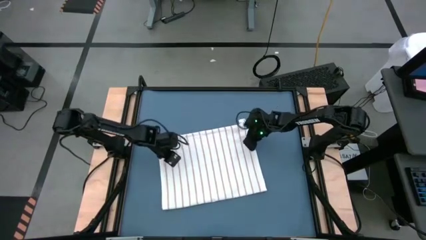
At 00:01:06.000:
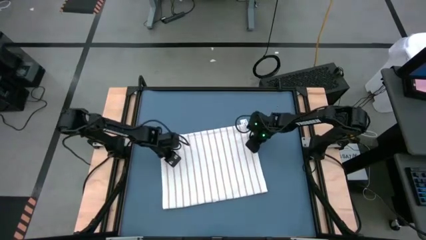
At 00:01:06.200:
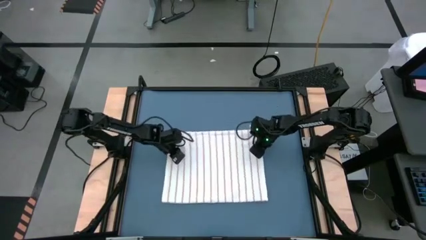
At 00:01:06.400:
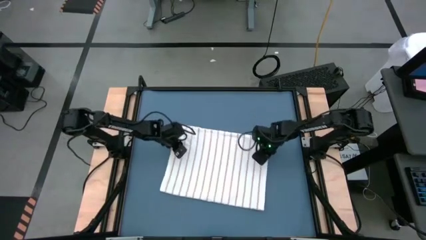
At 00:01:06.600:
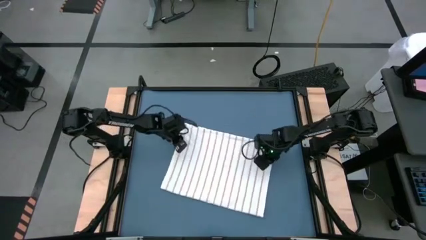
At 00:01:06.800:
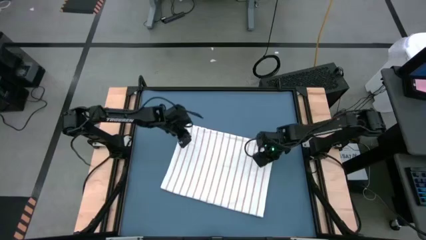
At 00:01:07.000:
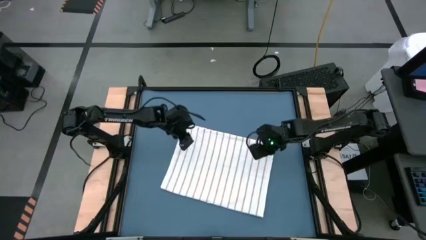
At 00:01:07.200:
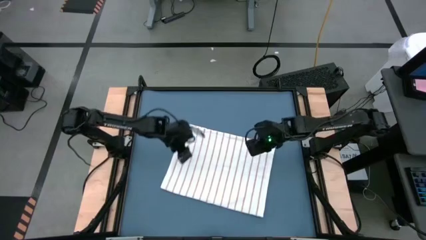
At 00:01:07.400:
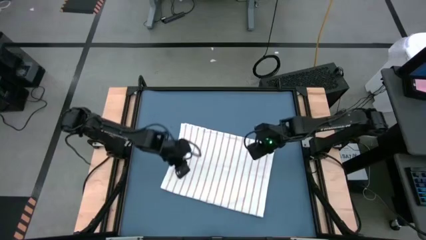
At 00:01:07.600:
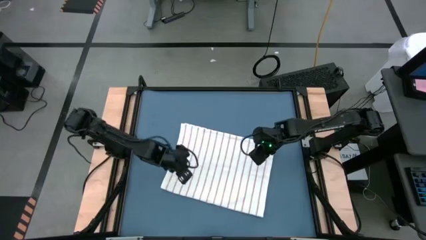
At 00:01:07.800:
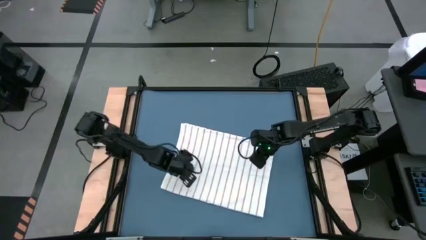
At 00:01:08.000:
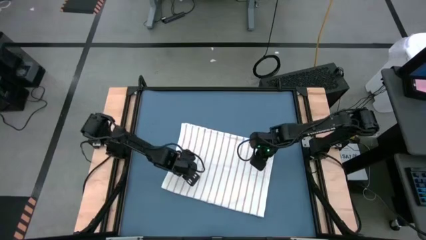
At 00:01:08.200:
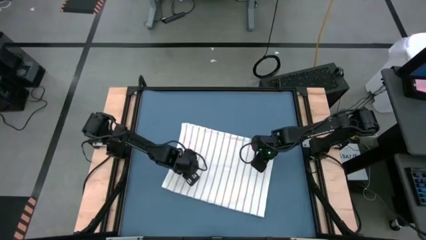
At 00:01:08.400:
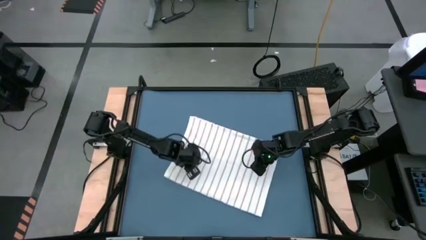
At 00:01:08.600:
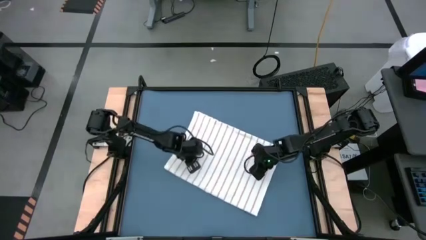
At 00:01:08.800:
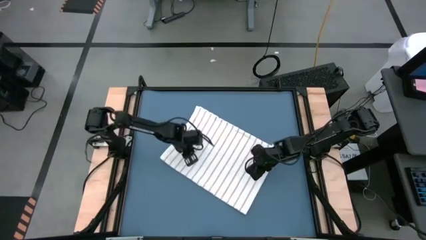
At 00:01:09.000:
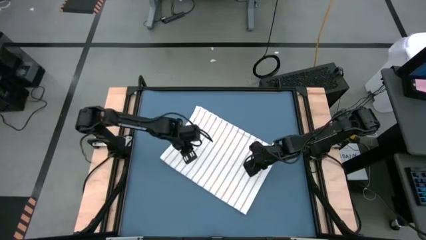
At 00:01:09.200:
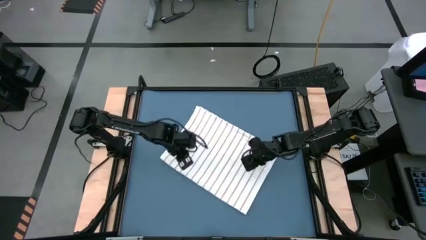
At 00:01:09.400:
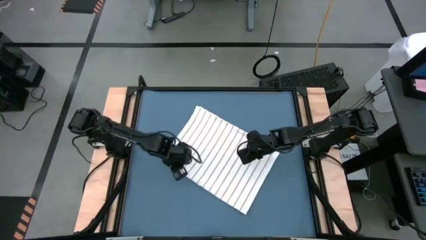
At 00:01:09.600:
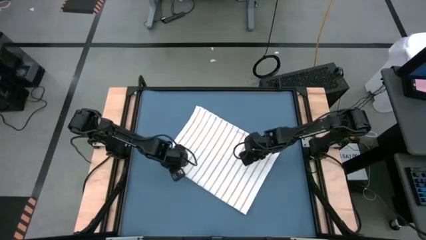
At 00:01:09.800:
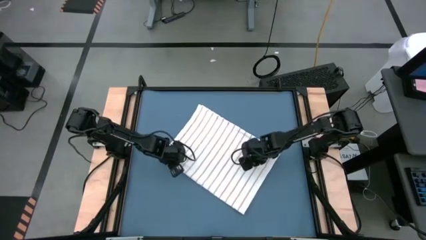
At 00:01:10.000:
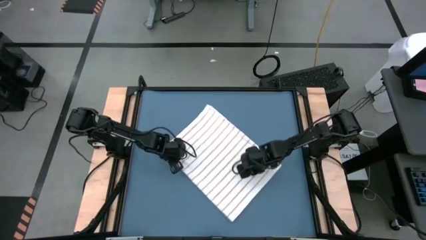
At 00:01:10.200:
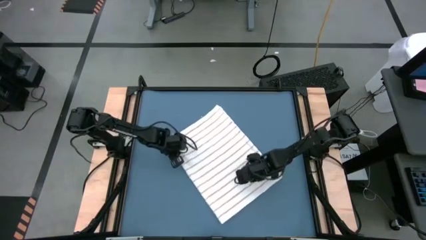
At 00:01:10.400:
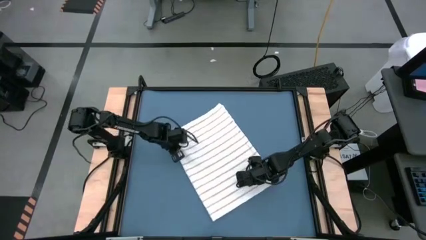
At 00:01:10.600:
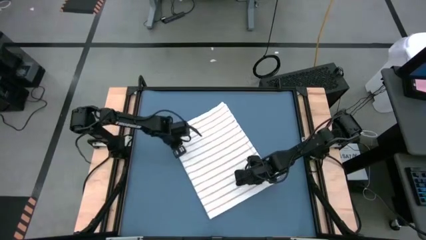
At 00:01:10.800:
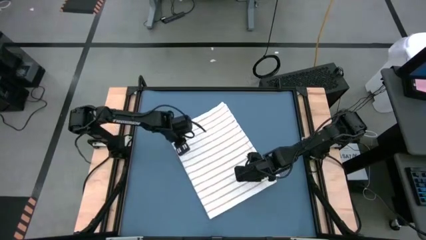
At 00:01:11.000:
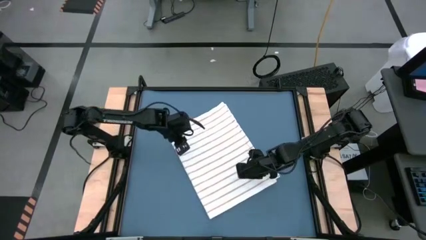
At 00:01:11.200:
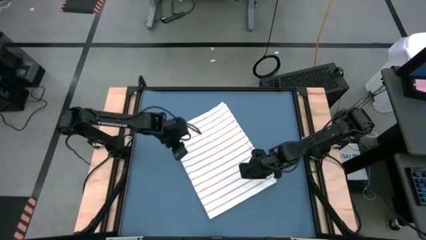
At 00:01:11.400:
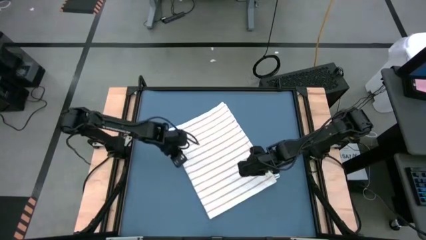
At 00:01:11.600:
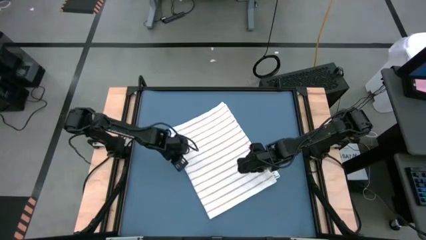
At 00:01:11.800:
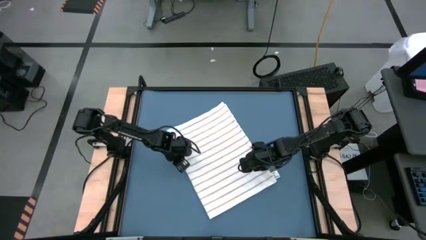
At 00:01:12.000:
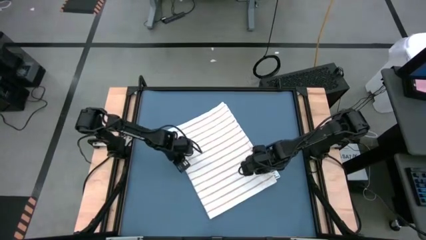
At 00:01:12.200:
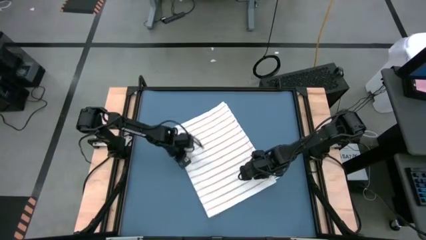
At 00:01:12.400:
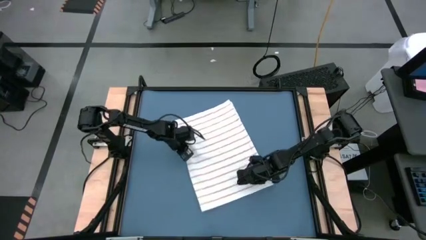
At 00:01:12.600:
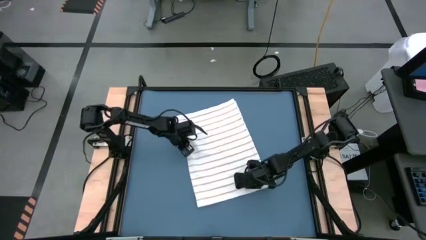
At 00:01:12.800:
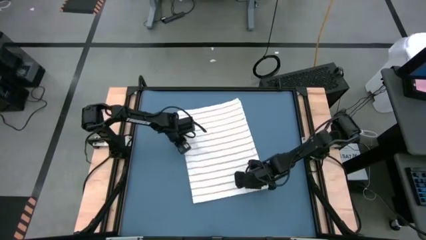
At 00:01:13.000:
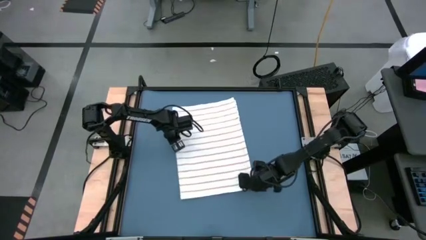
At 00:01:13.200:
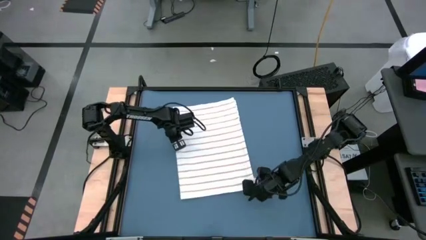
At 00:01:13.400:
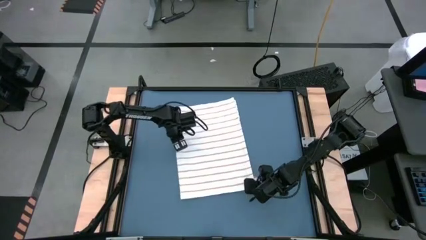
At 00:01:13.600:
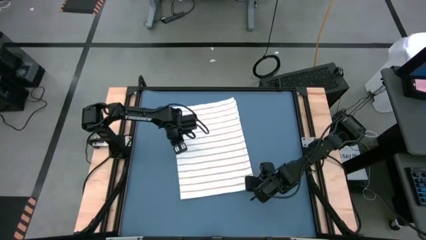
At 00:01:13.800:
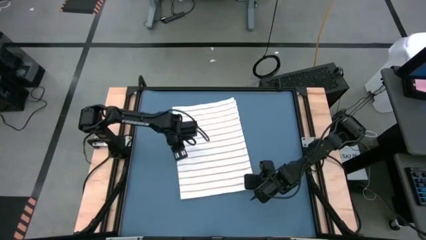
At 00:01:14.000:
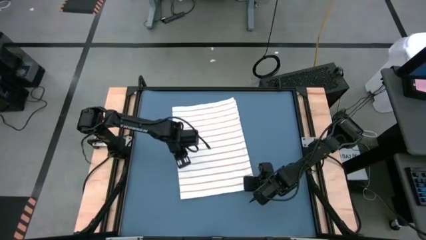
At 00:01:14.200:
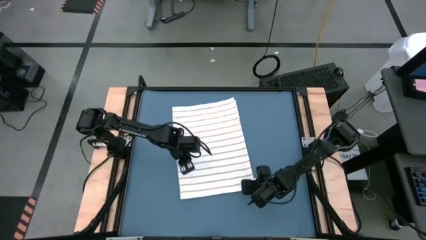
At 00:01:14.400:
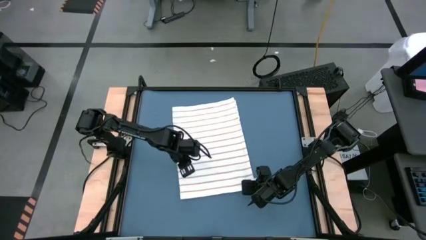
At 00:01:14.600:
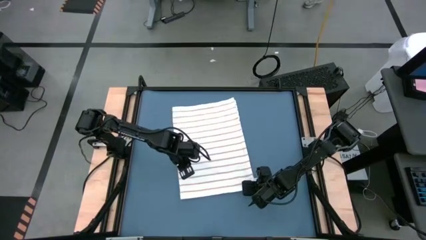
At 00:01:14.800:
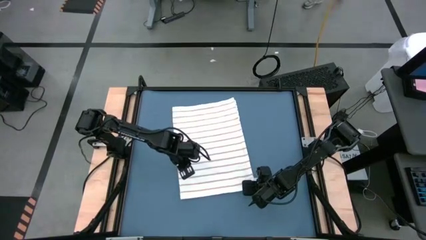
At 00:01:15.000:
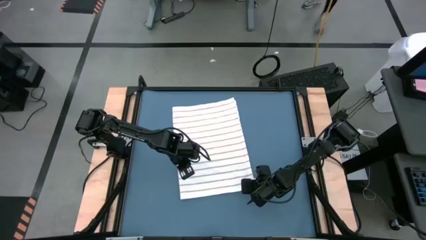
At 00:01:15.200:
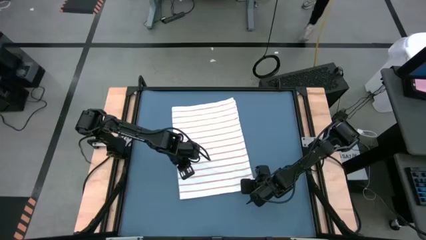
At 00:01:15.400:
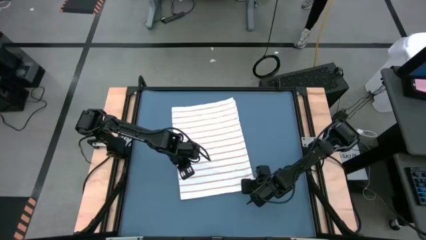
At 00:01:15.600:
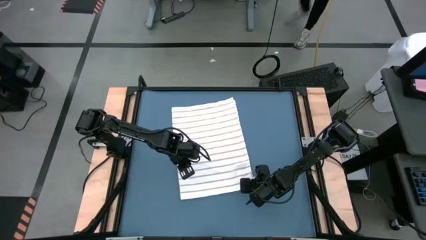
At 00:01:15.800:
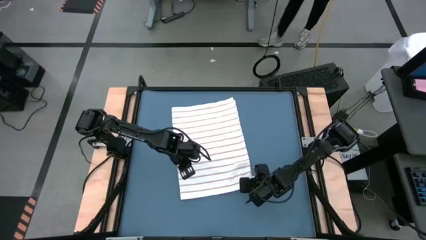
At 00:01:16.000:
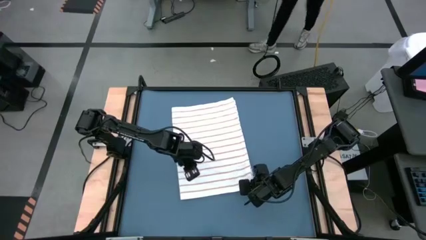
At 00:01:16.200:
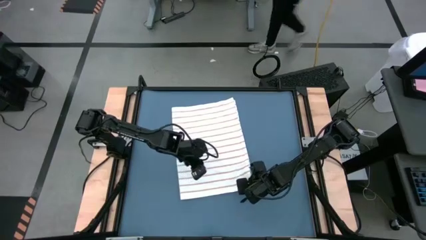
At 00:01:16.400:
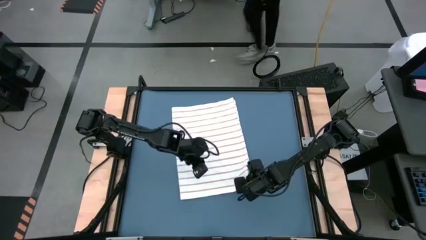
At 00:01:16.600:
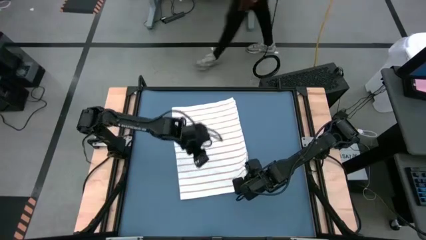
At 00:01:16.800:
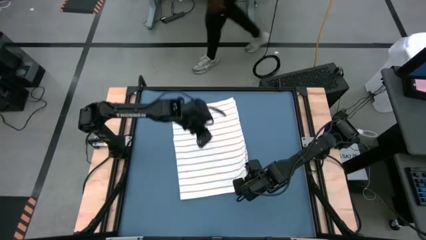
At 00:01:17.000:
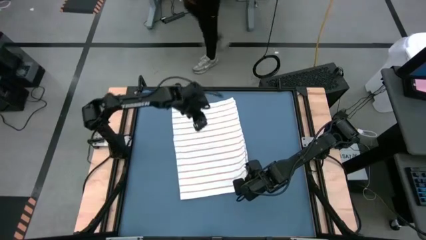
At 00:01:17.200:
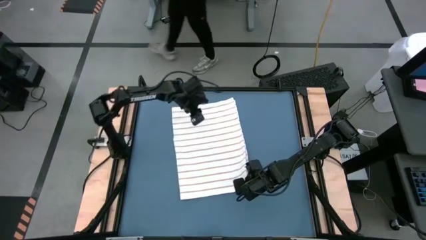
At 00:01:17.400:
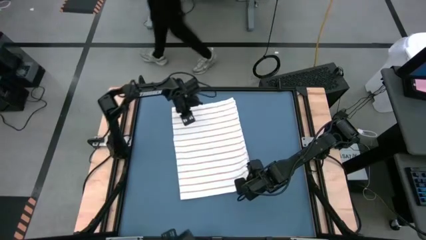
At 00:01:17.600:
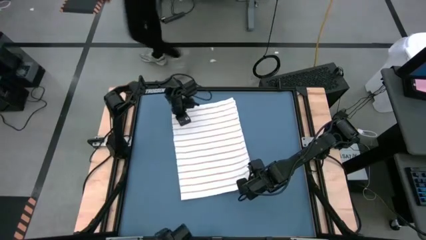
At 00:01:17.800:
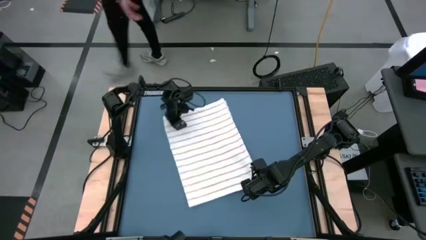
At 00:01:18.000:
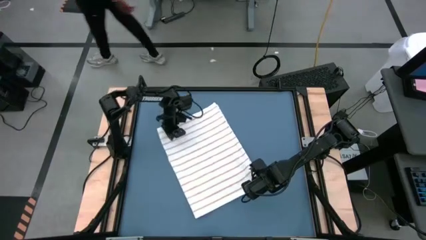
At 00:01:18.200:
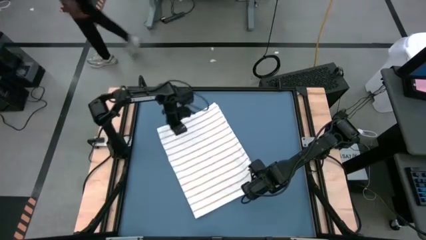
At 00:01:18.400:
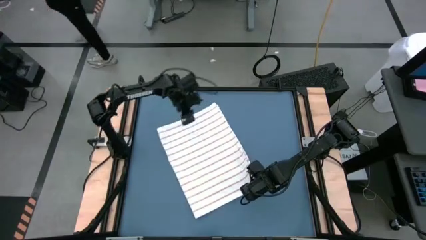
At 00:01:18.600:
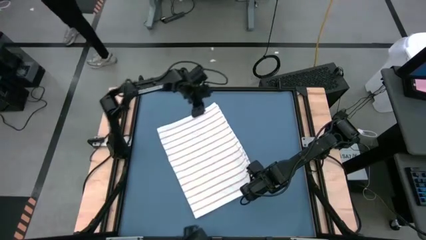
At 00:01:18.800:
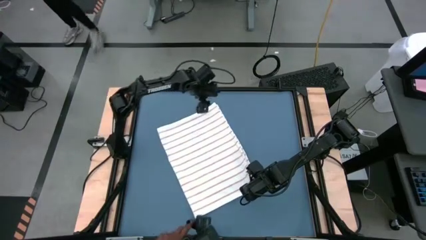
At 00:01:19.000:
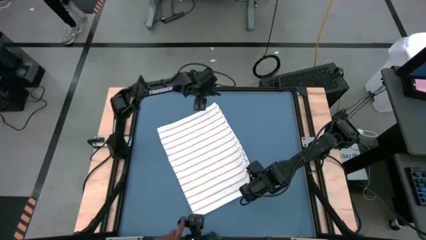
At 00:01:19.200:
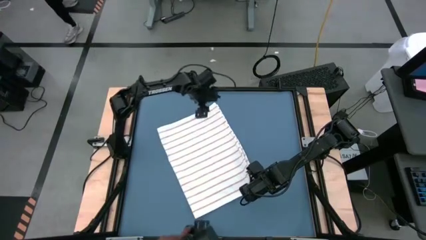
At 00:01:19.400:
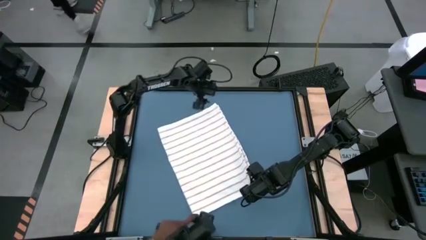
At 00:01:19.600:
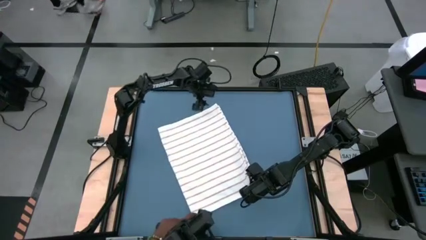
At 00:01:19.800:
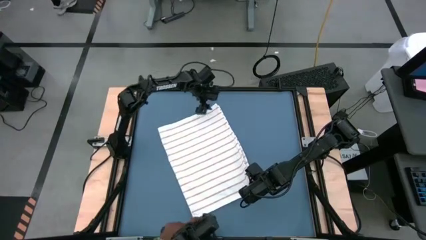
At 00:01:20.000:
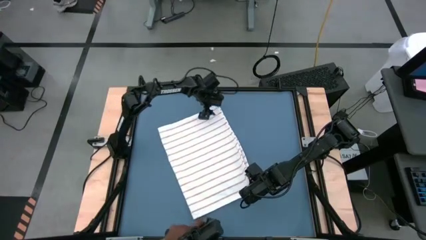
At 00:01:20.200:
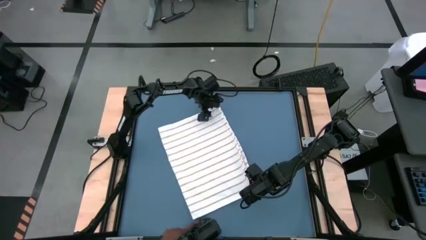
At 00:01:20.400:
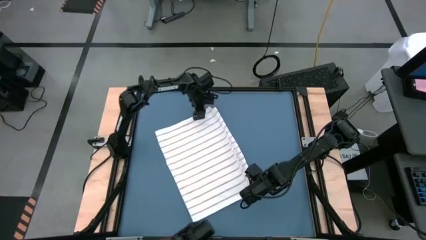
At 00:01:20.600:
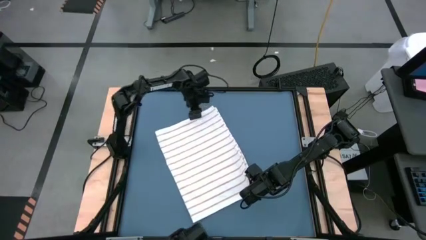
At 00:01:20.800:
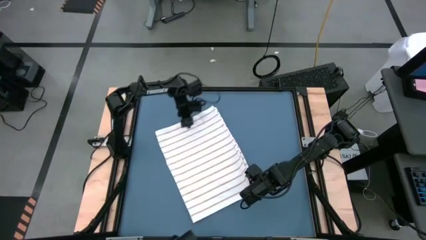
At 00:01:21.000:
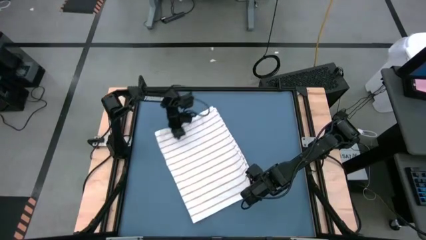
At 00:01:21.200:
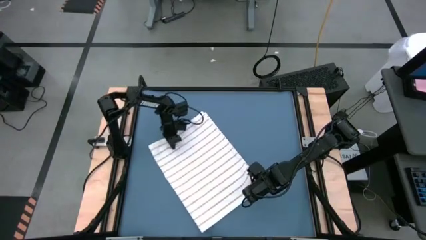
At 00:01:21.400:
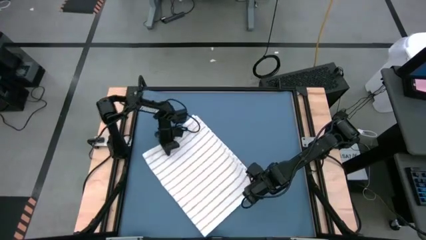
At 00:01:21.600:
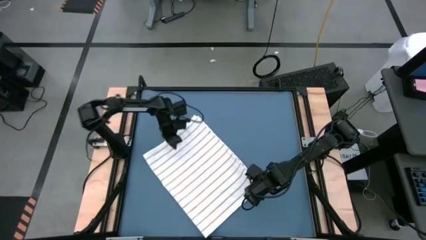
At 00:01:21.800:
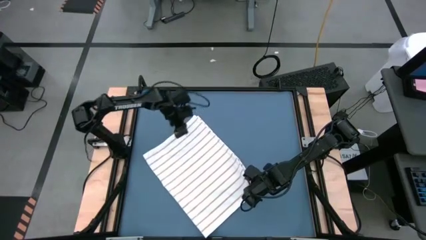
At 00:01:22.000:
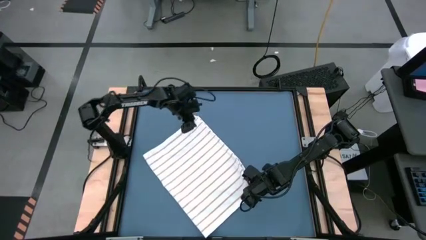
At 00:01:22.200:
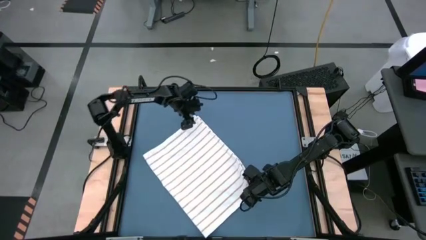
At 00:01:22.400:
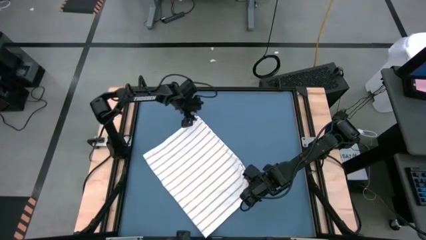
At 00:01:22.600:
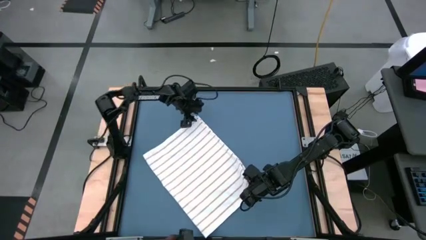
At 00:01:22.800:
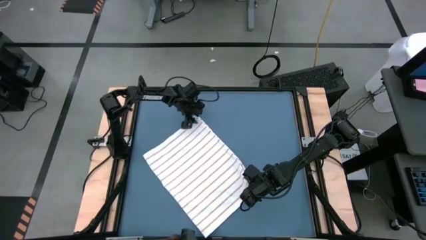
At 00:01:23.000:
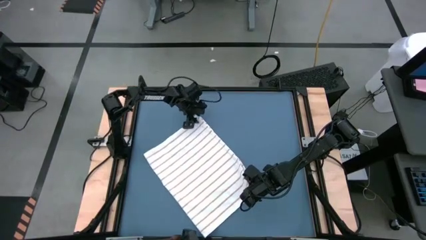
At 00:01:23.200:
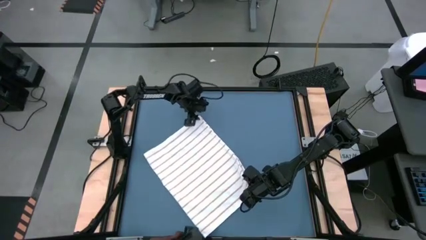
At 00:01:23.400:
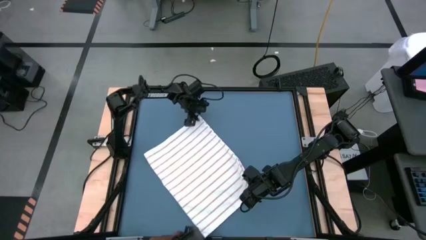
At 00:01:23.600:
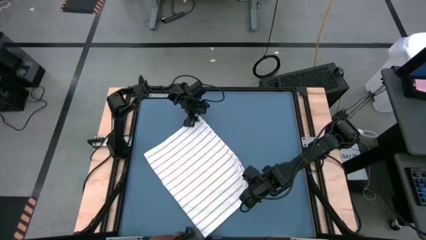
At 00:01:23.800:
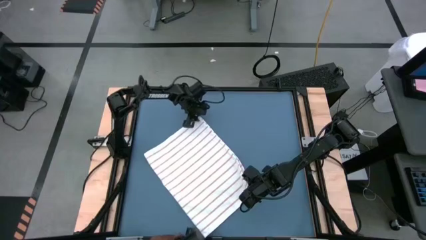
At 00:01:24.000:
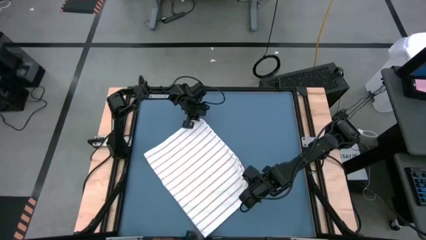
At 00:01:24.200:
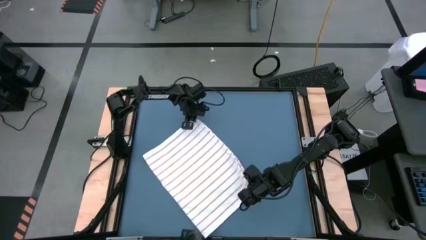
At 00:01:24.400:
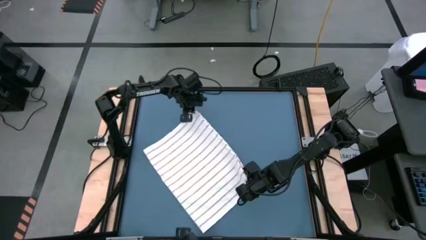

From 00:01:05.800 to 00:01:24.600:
Task: Roll towel
Fold the white towel
